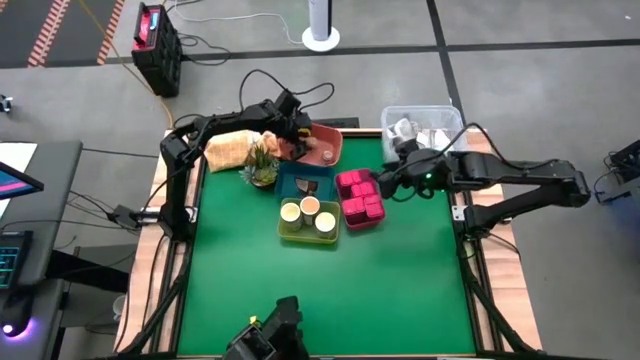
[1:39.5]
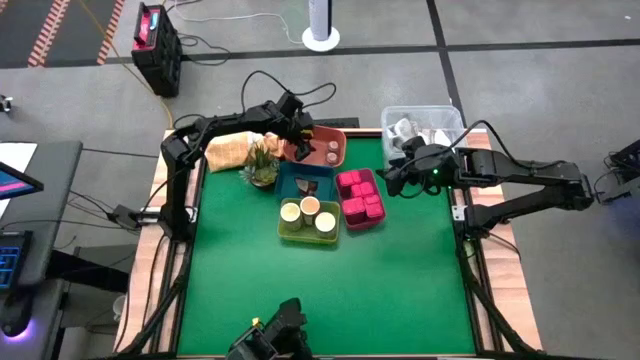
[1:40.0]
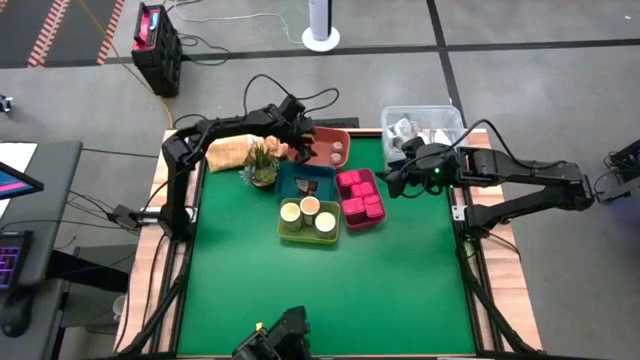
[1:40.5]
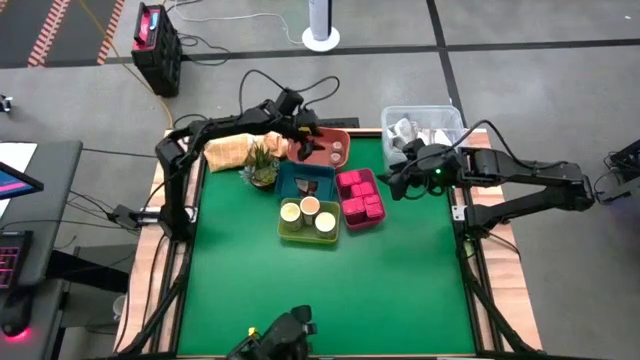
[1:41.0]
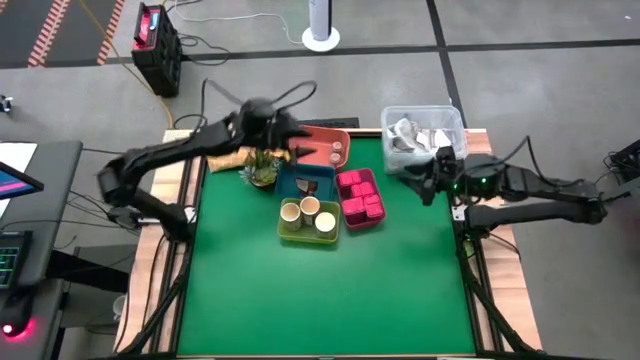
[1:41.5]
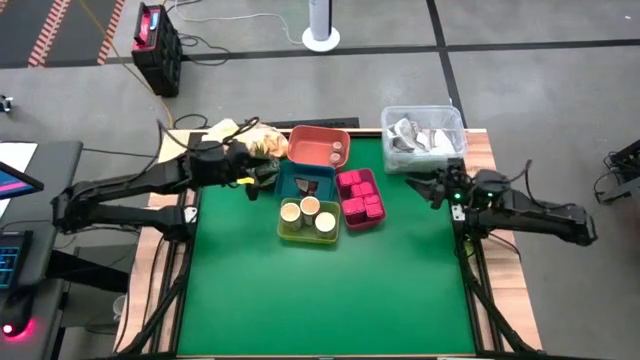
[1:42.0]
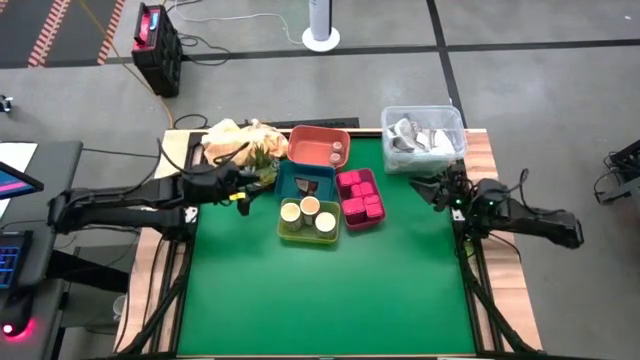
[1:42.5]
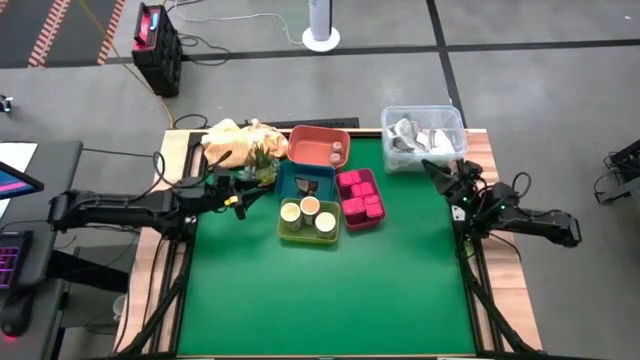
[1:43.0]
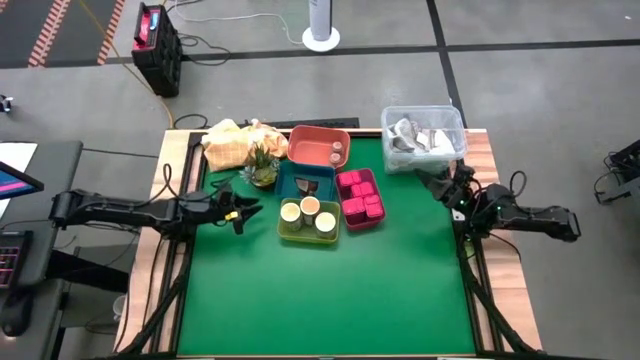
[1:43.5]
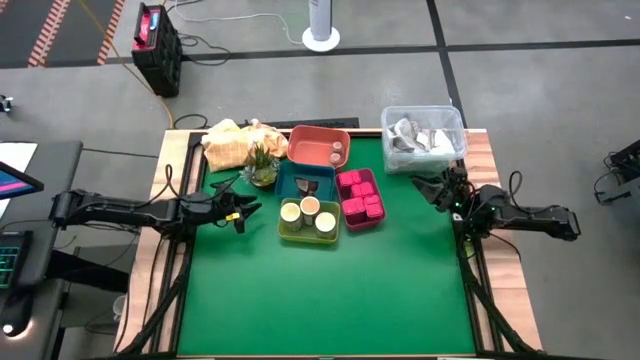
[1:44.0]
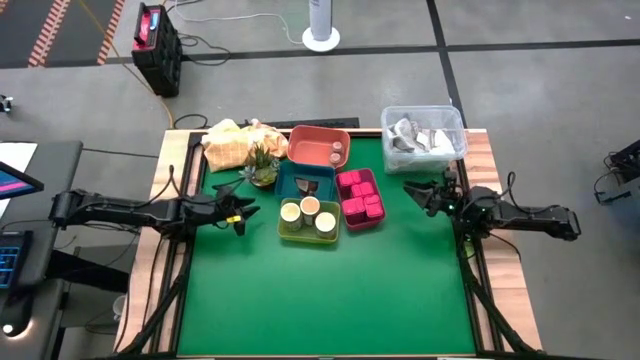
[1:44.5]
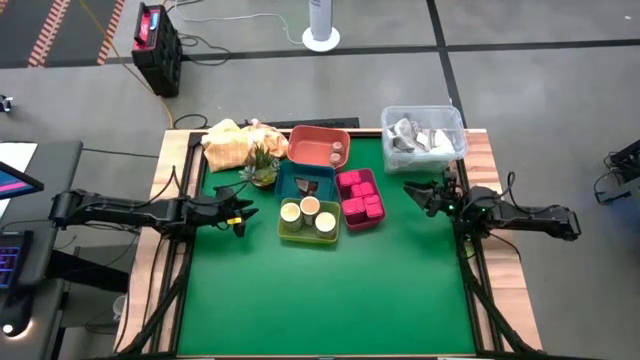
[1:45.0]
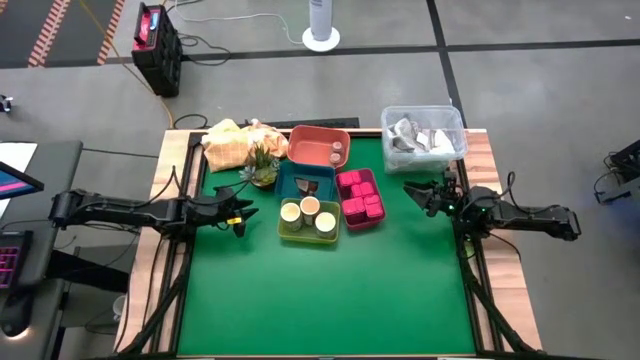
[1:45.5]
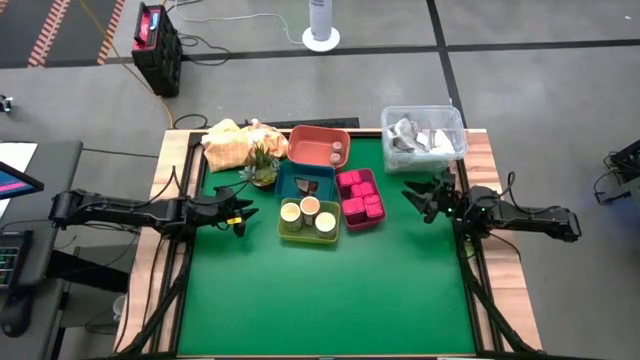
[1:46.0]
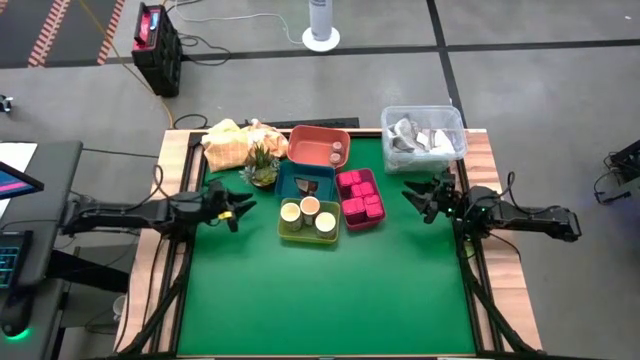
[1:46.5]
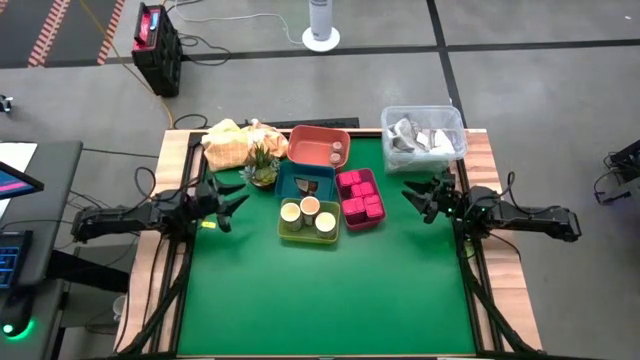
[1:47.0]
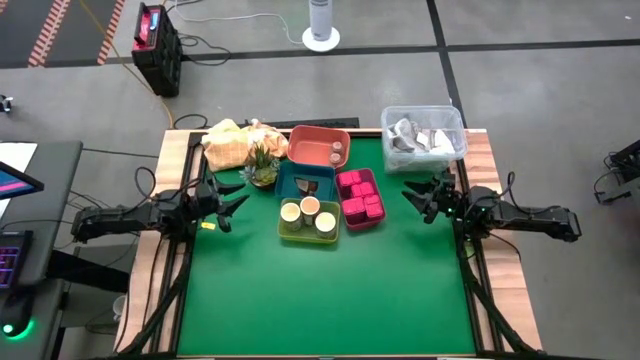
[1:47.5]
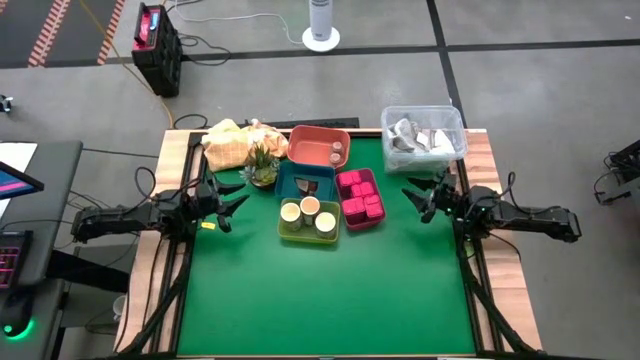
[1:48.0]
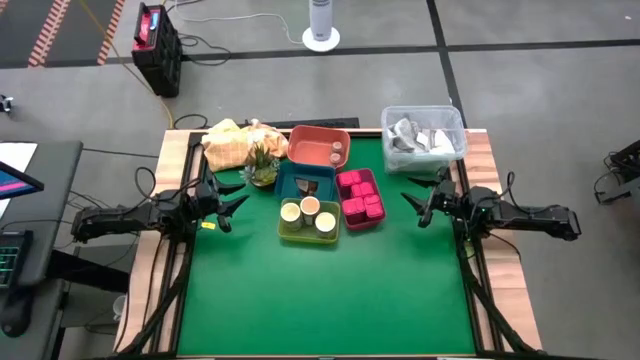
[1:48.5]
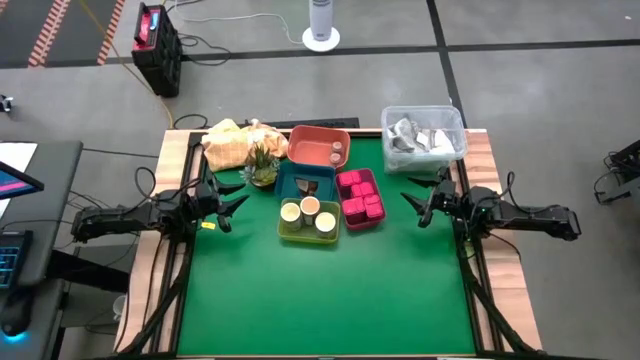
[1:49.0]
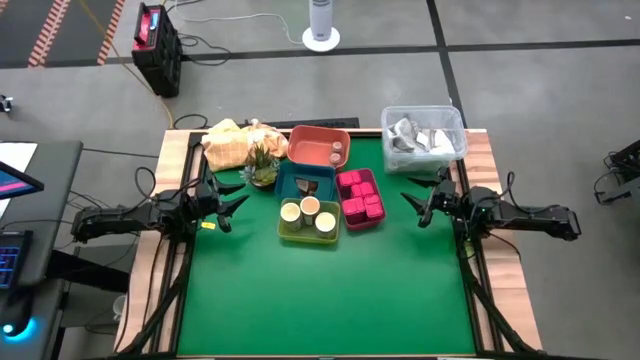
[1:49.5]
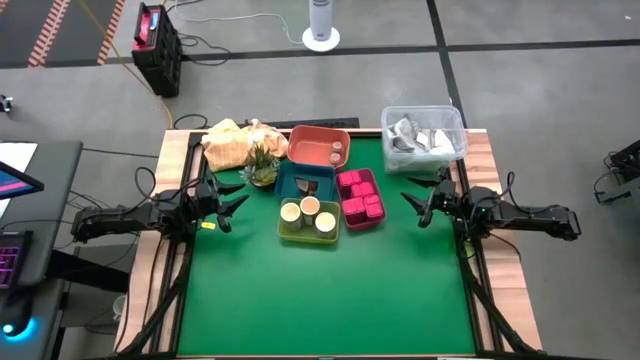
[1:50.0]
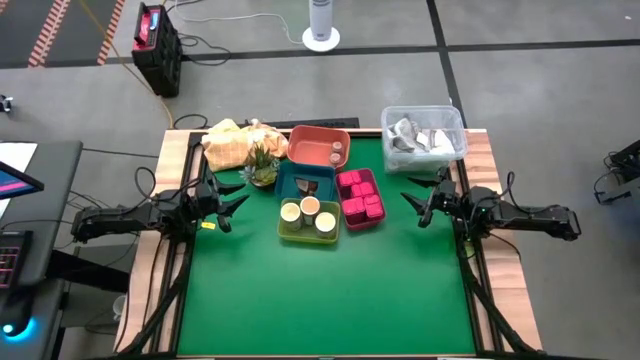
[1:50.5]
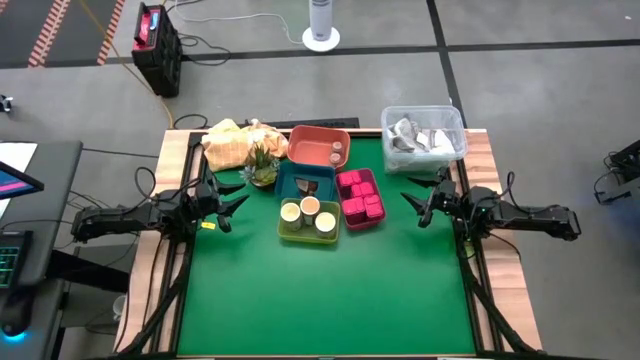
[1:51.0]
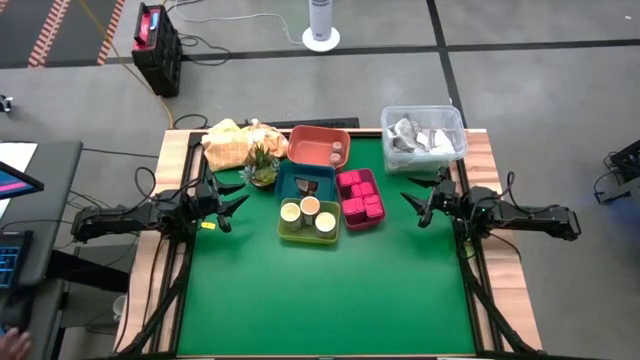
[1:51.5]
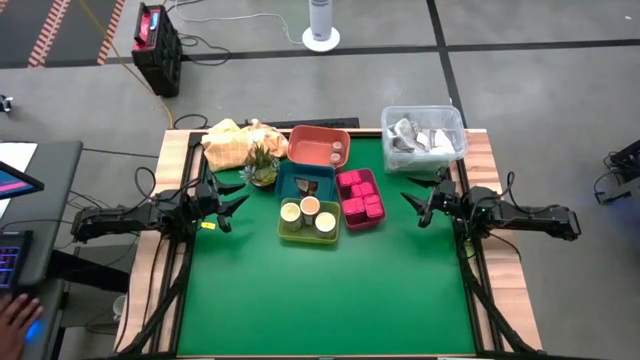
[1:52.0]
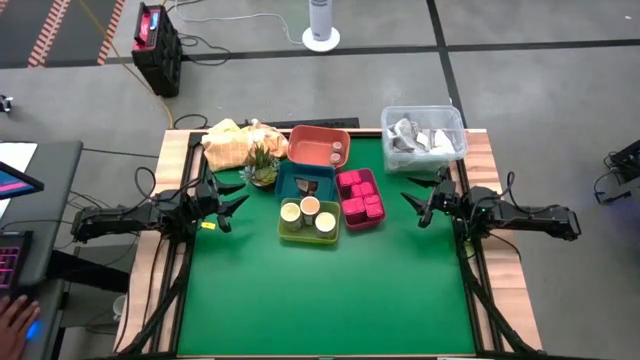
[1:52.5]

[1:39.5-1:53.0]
Task: Sort spices by type
Return to Home Position

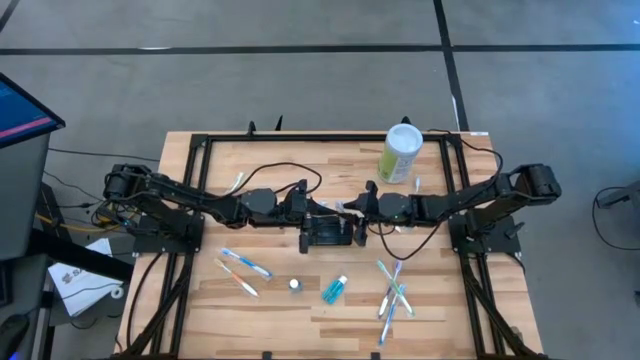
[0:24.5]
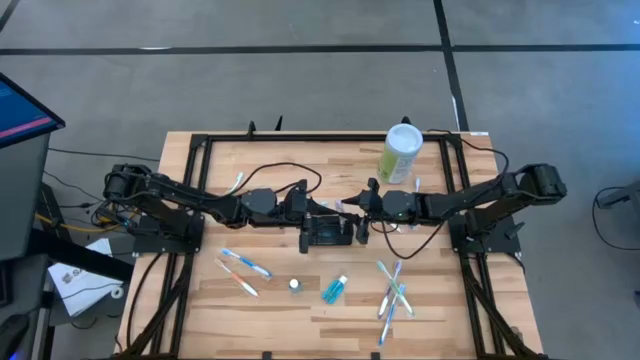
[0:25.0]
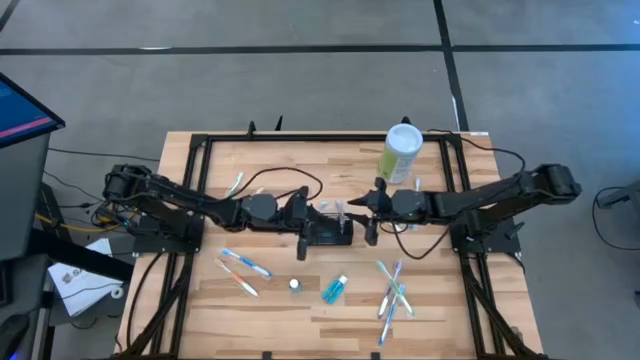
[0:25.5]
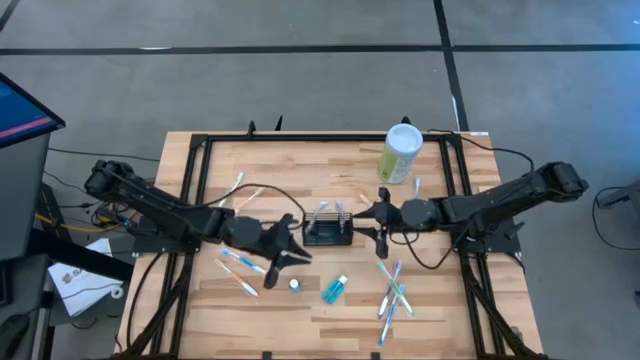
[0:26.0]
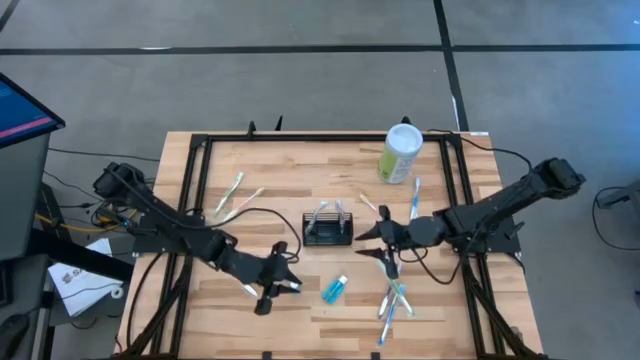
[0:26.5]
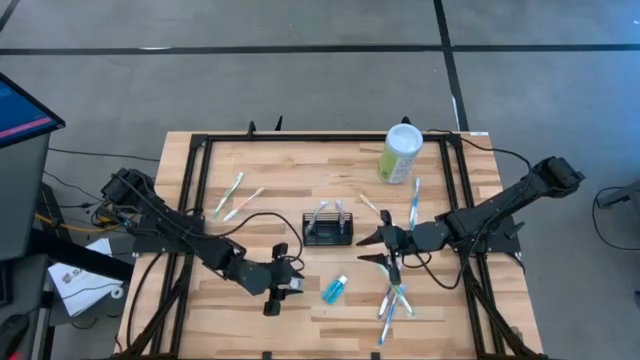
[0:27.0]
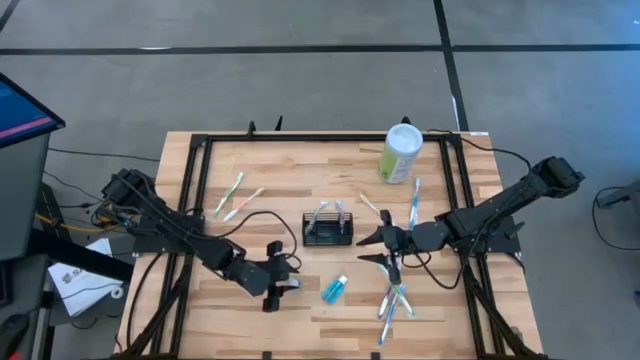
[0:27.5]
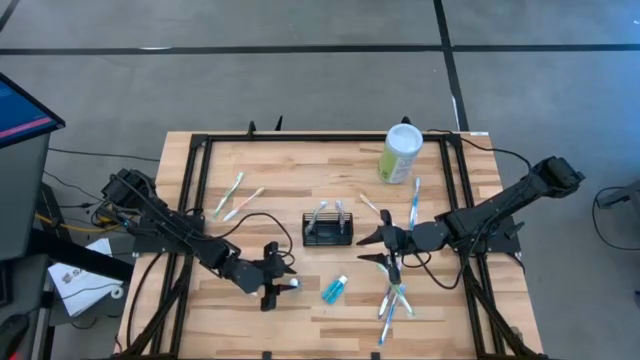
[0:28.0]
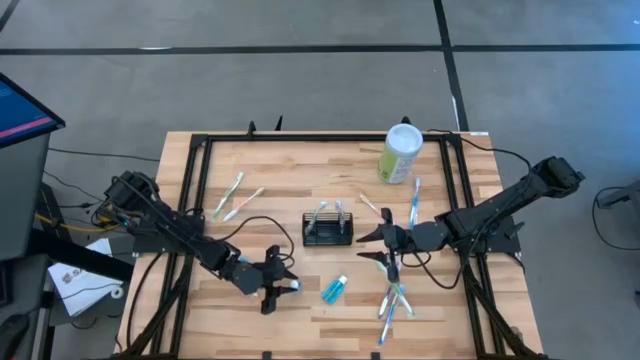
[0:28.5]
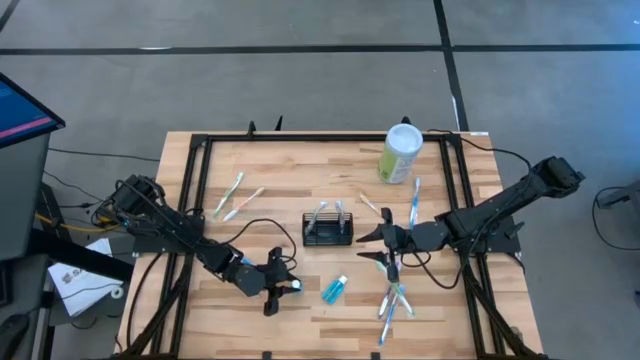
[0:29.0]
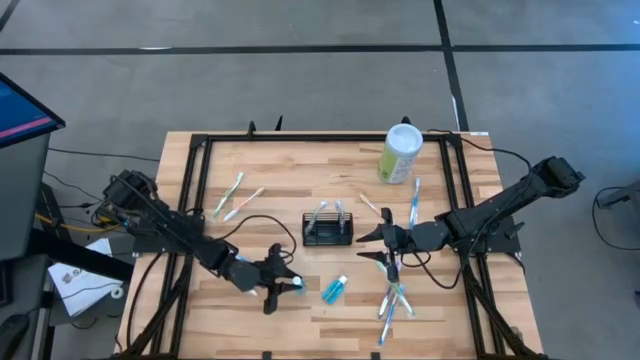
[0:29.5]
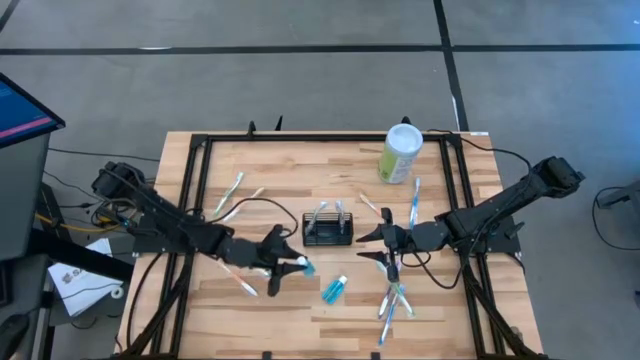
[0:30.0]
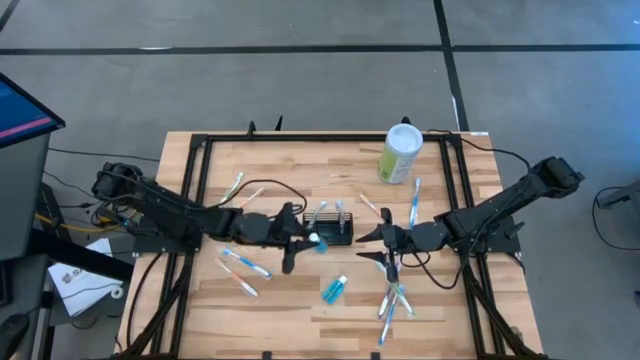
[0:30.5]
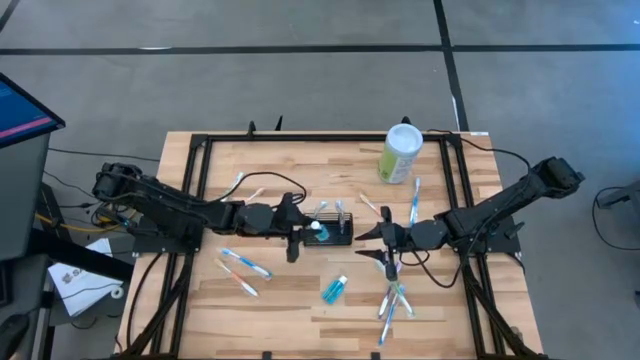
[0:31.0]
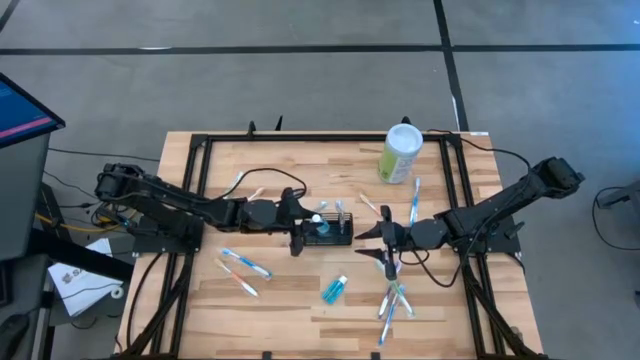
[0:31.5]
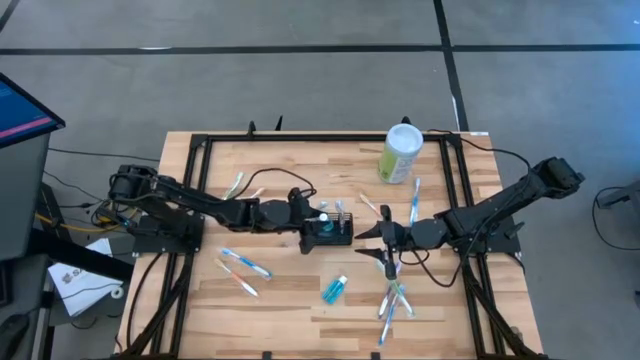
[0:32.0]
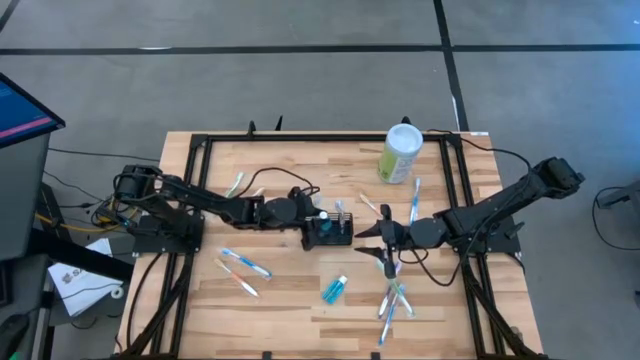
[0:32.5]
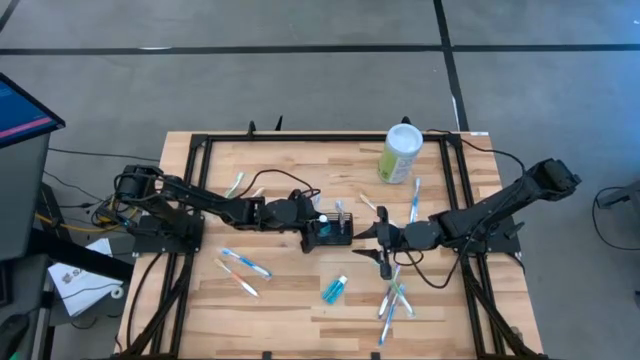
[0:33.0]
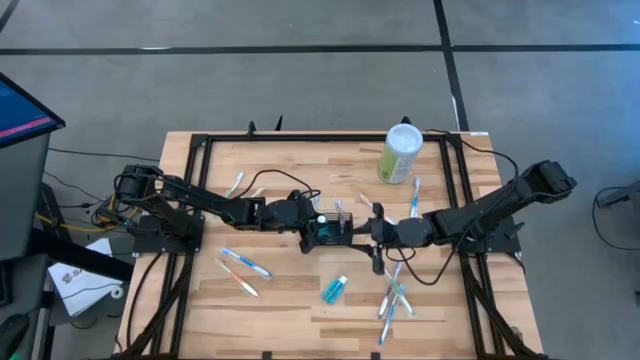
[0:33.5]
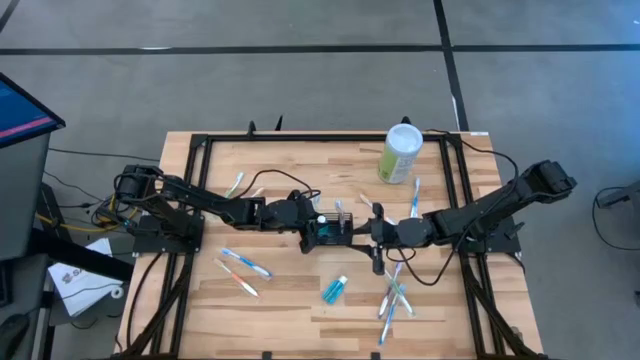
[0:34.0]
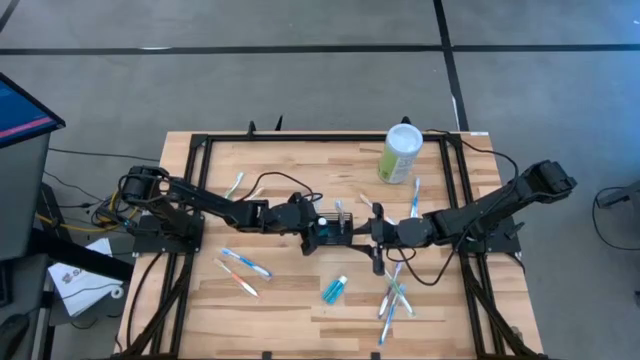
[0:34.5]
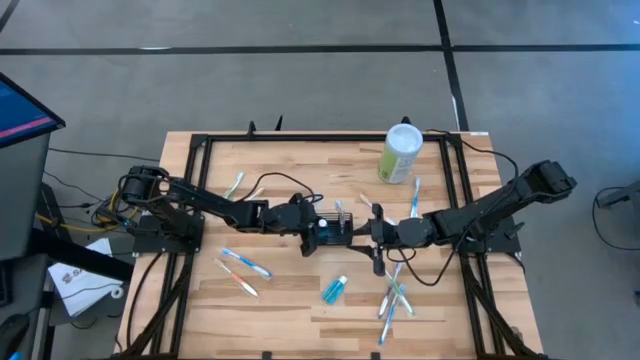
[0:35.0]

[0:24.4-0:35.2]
Task: Pick & Place toothbrushing station
Put the left mouthwash bottle into the middle compartment of the organizer
